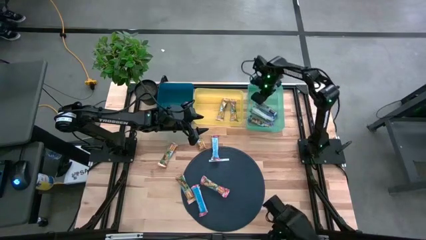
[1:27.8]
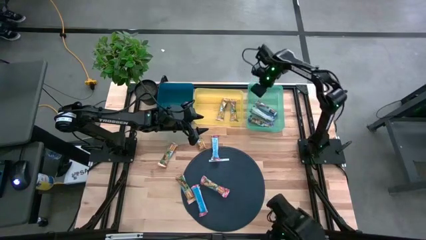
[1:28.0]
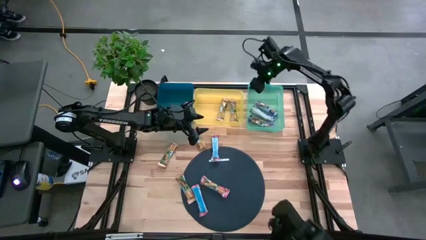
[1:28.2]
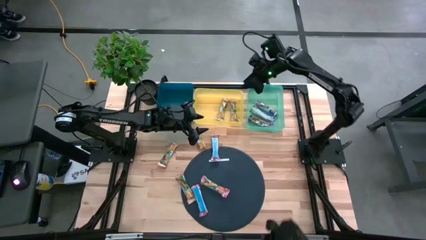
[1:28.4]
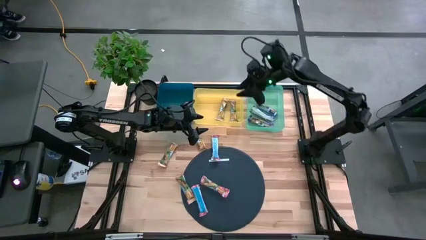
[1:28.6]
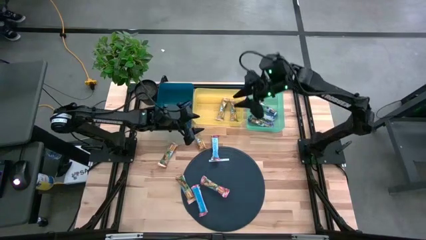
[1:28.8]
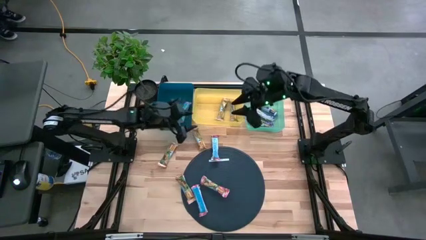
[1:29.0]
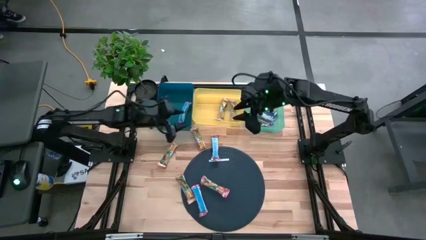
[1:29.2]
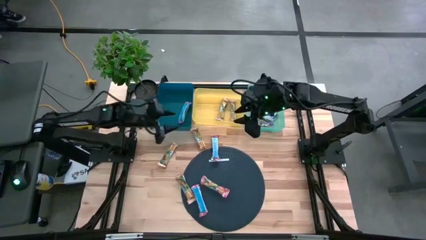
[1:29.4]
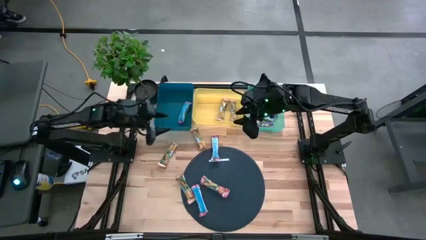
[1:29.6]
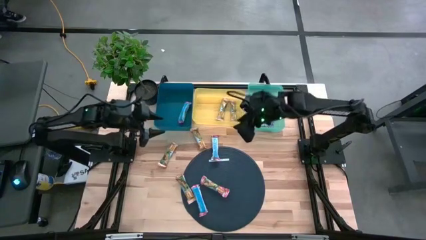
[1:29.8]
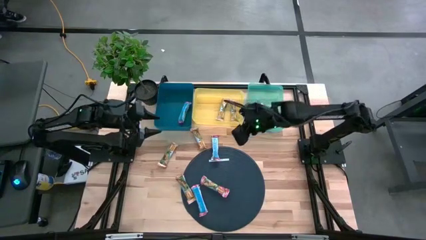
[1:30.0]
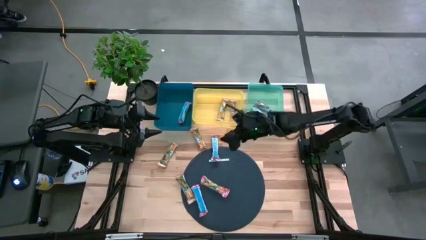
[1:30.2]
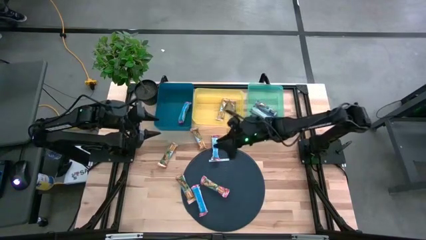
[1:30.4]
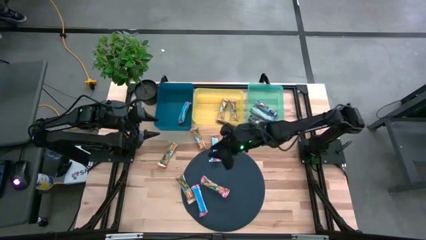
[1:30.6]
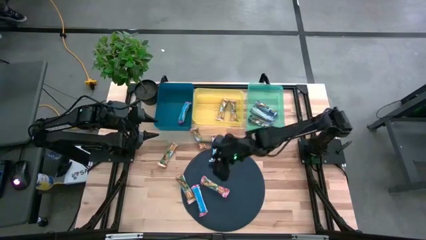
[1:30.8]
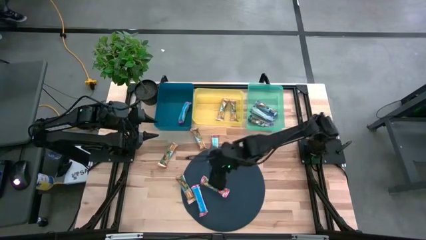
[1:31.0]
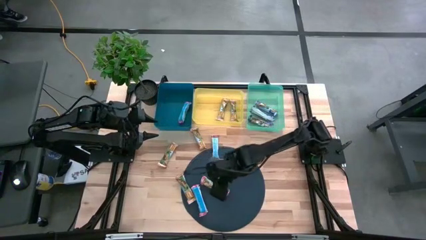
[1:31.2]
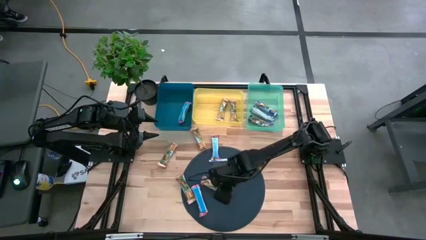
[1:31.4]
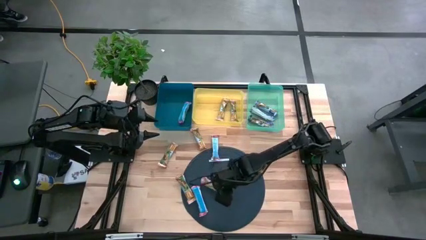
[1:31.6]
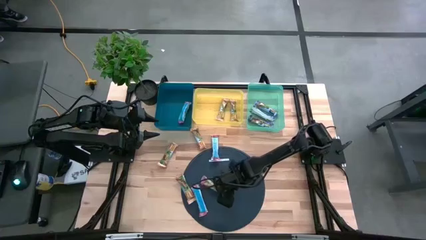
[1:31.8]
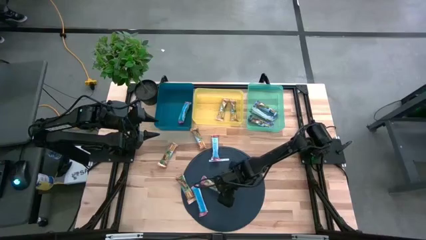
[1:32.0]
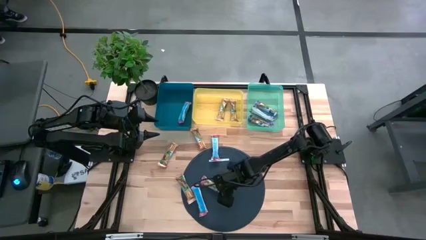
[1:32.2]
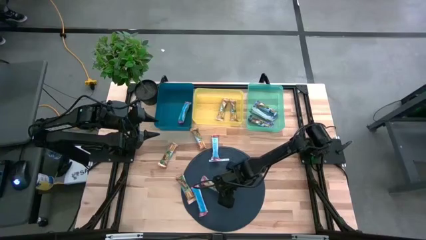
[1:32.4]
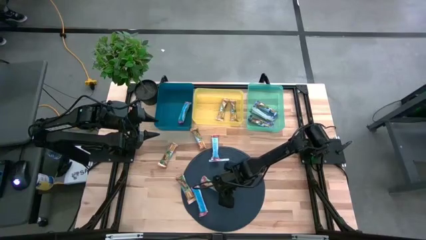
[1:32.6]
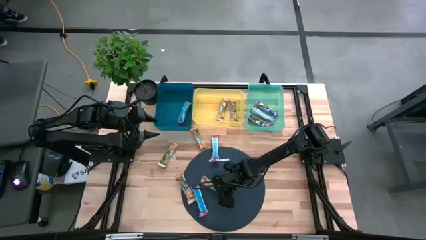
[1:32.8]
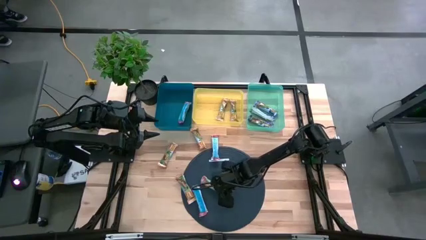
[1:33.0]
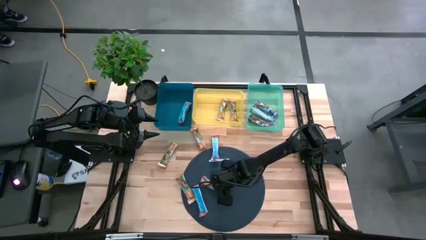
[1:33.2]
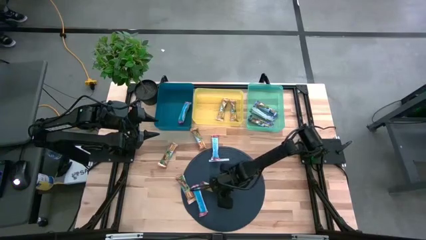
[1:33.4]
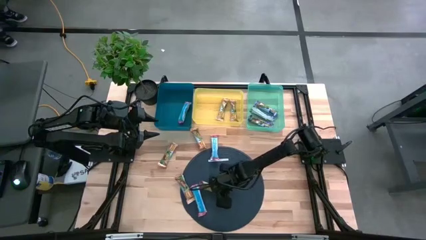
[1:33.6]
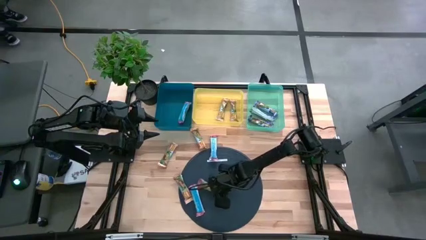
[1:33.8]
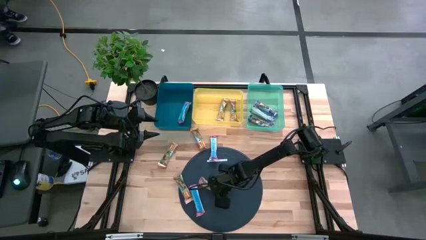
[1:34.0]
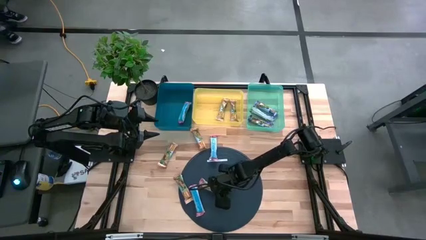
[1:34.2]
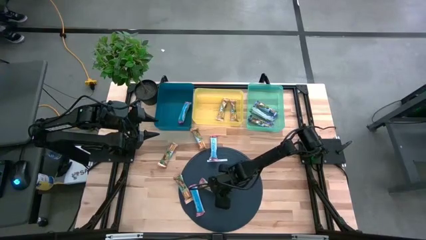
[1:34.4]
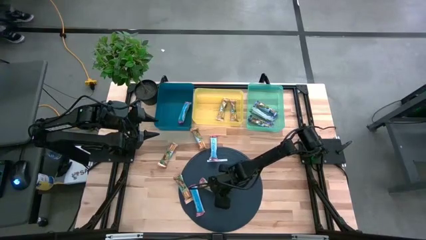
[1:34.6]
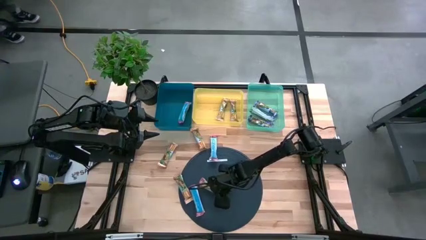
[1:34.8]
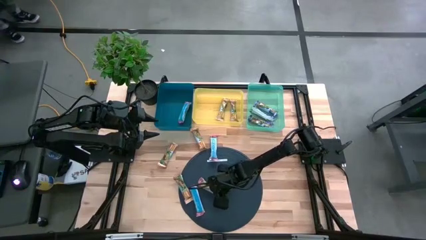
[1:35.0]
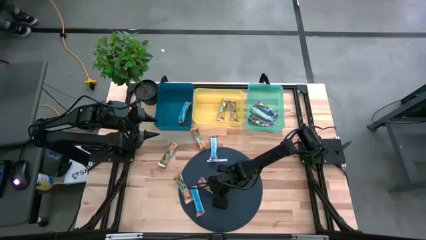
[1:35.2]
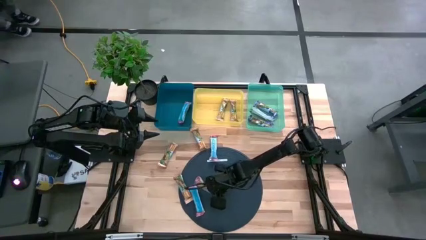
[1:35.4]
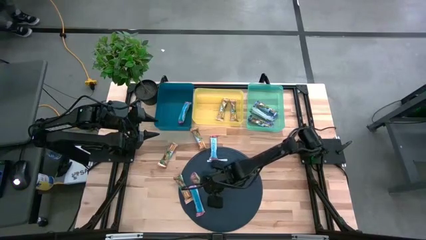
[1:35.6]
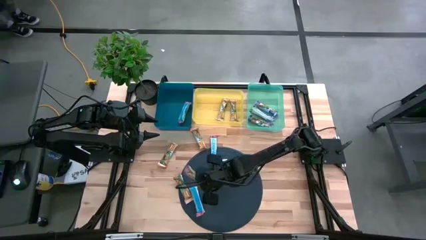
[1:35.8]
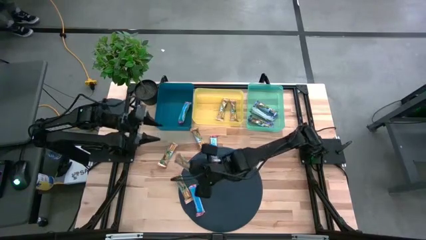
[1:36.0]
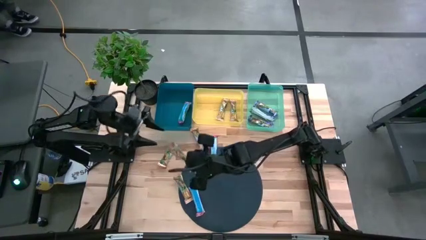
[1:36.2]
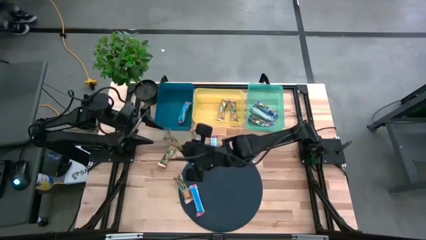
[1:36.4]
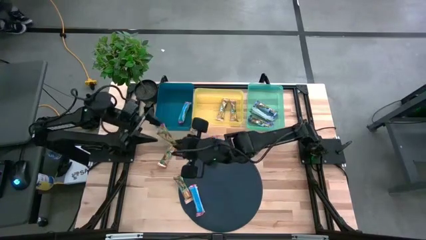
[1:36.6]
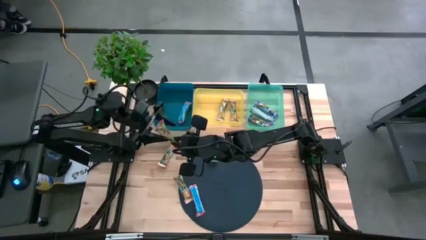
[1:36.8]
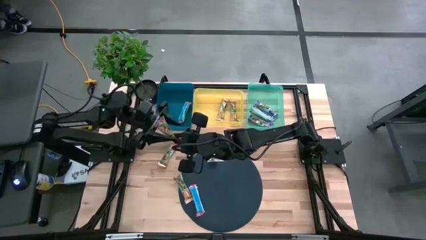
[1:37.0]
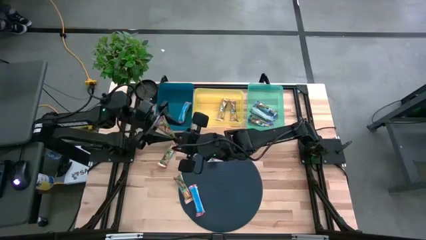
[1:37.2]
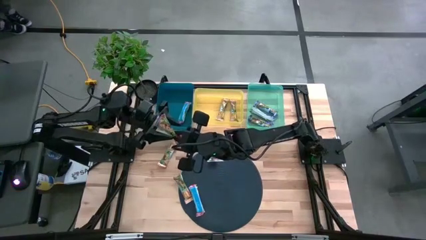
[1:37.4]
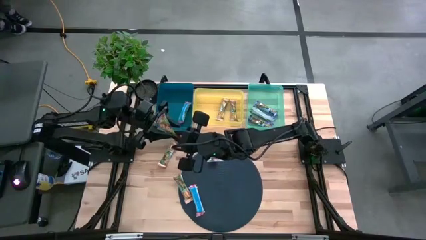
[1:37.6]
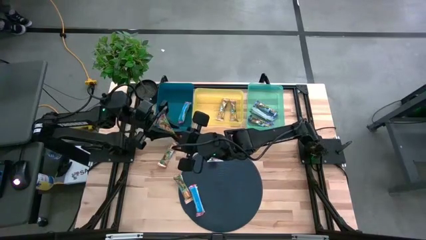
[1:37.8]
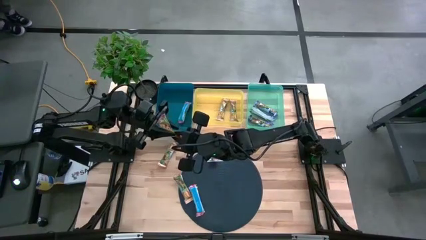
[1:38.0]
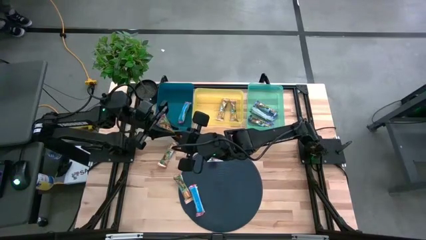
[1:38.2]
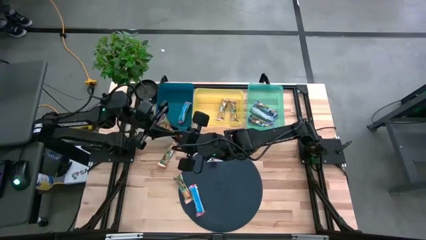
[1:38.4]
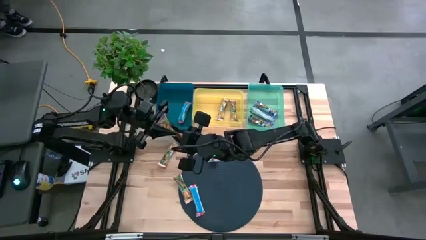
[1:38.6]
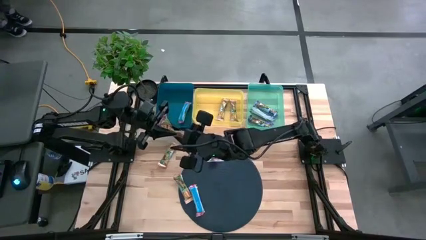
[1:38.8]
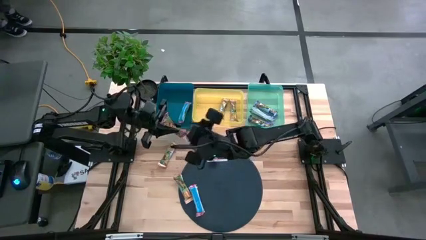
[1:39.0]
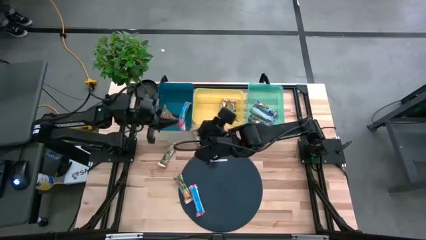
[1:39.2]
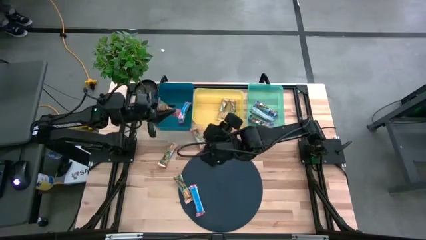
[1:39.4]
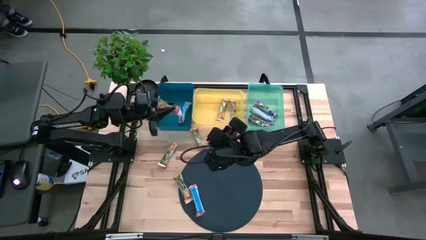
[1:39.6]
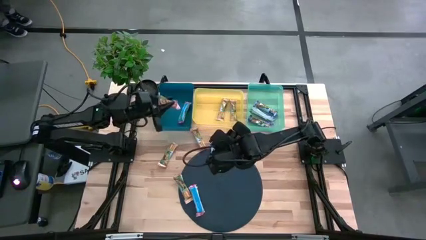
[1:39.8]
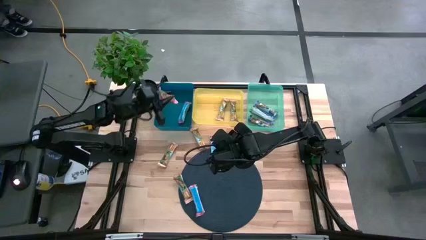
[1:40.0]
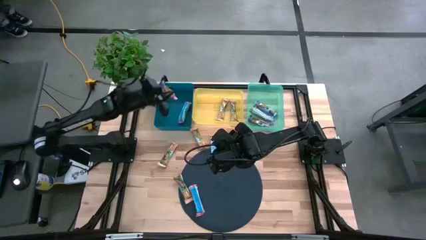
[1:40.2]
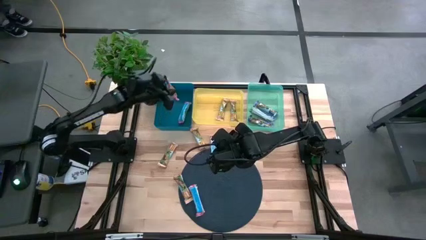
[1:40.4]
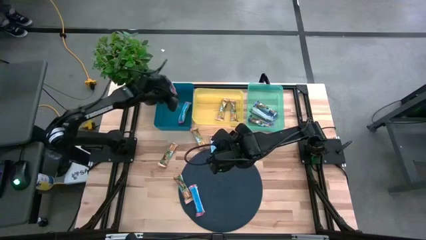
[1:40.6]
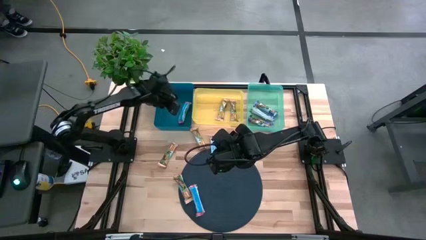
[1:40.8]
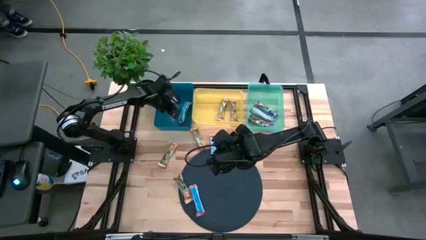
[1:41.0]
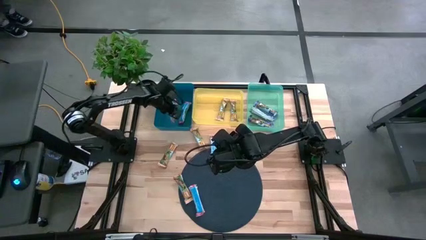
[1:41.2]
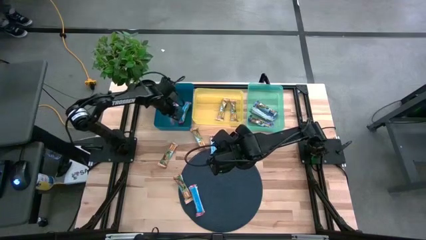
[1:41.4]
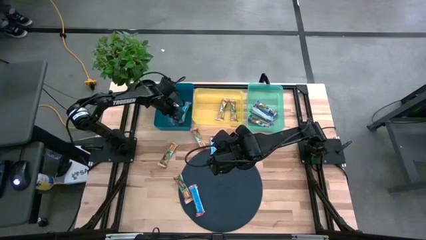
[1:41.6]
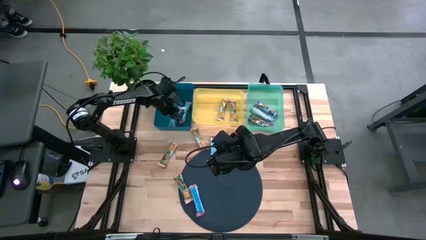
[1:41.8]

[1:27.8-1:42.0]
Task: Pick and place Granola Bars by type
Put the red granola bar into the blue bin

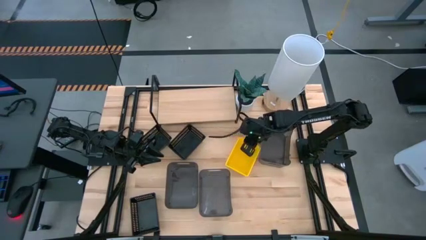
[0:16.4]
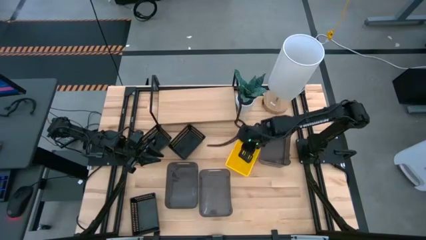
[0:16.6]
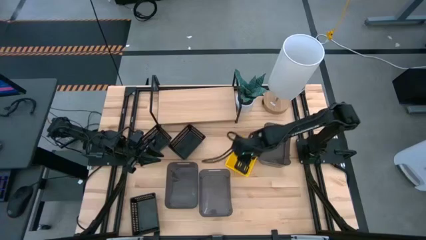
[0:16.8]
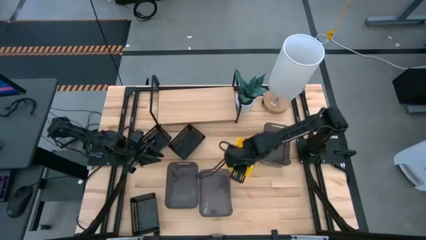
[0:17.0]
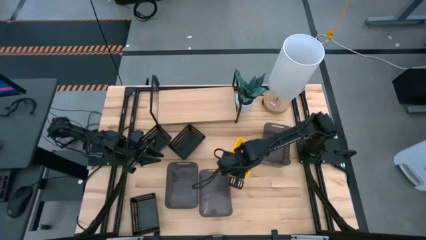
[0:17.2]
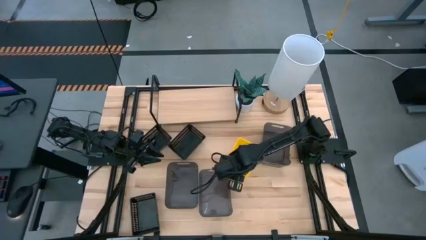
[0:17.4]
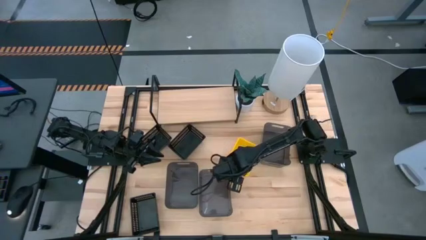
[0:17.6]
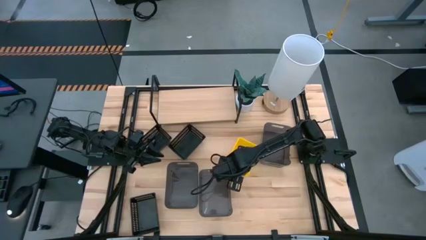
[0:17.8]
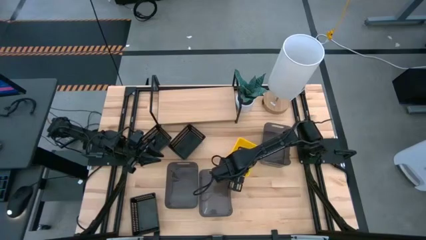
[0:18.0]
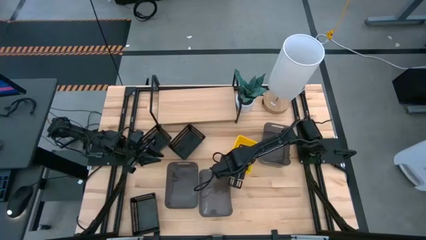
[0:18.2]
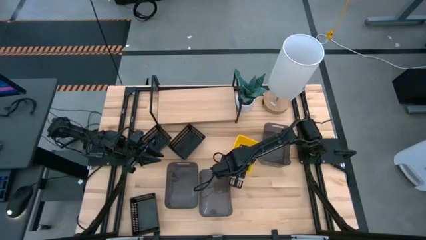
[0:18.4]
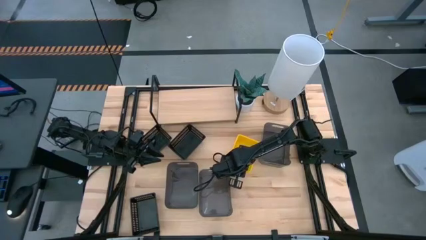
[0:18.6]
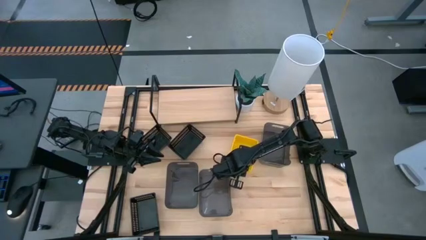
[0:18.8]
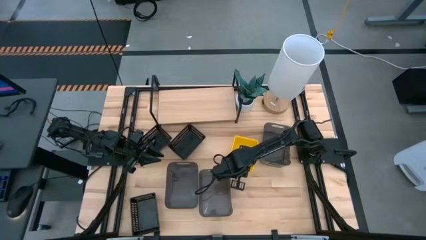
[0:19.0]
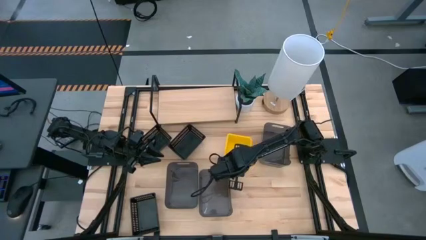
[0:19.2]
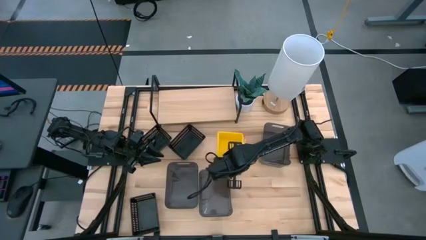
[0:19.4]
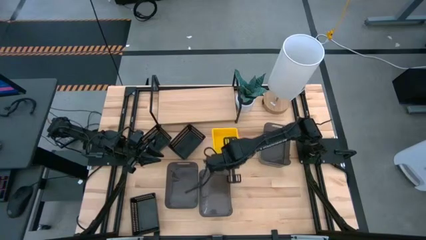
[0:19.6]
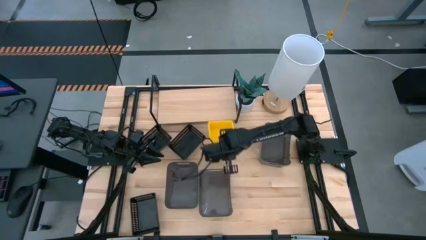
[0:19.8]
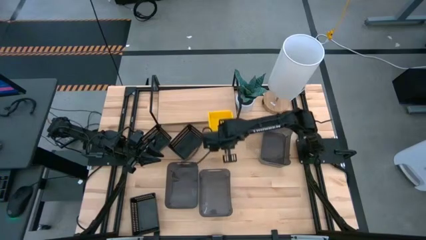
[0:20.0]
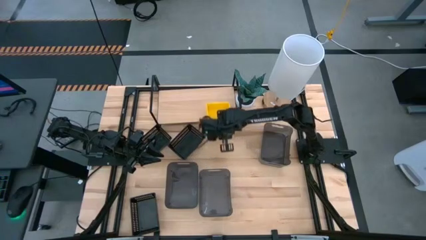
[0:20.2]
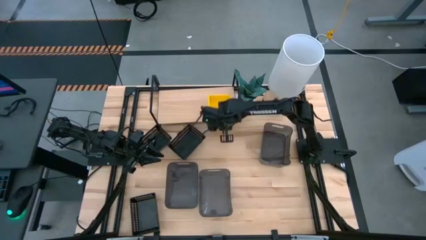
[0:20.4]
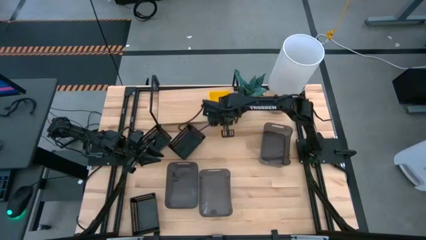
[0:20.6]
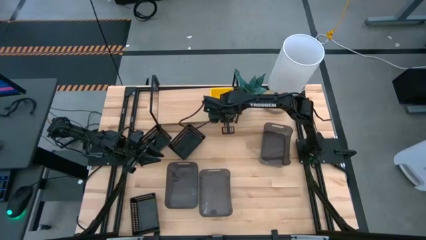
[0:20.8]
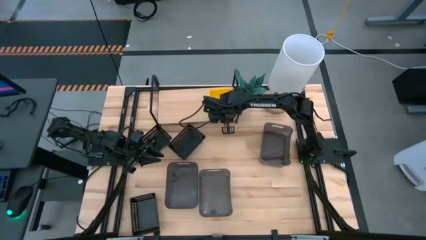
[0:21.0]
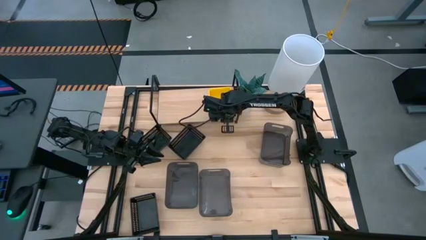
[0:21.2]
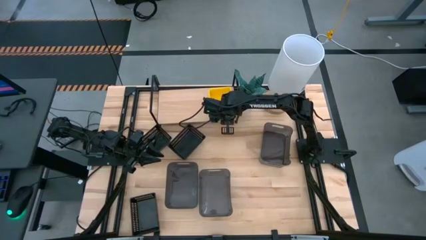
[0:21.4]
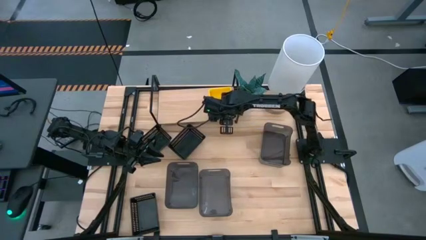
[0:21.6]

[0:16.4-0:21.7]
Task: Stack baskets on shelf by color
Put the stack of yellow bins on the shelf
